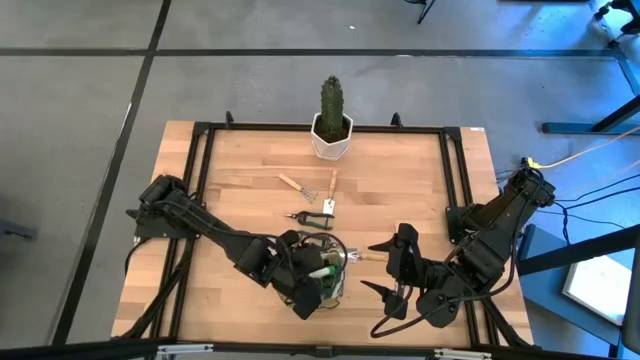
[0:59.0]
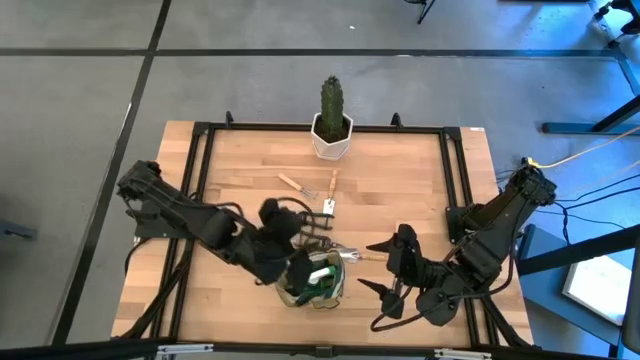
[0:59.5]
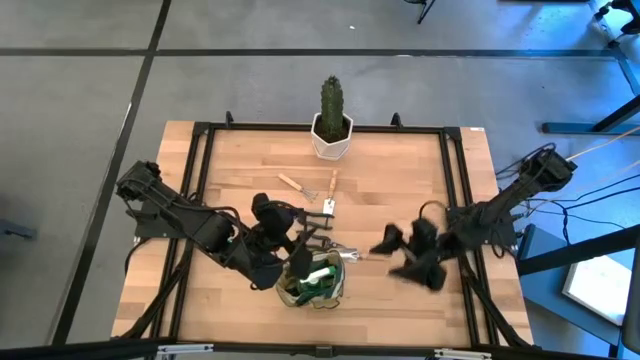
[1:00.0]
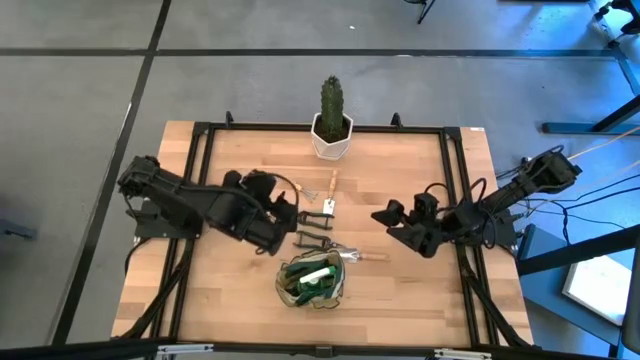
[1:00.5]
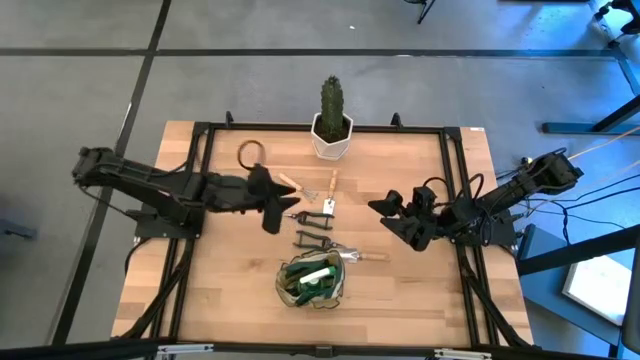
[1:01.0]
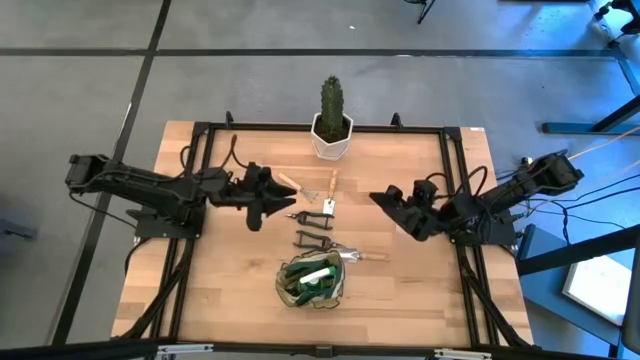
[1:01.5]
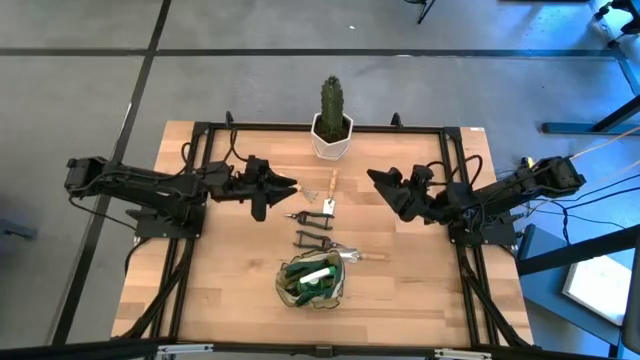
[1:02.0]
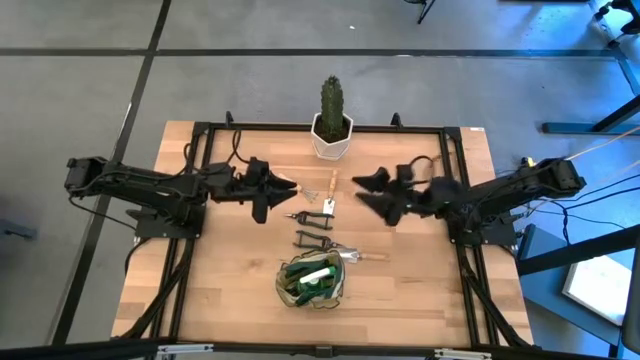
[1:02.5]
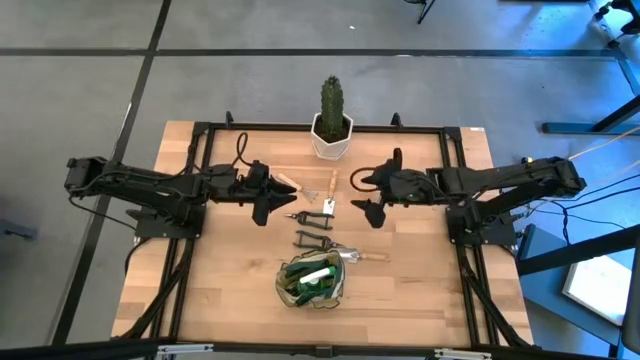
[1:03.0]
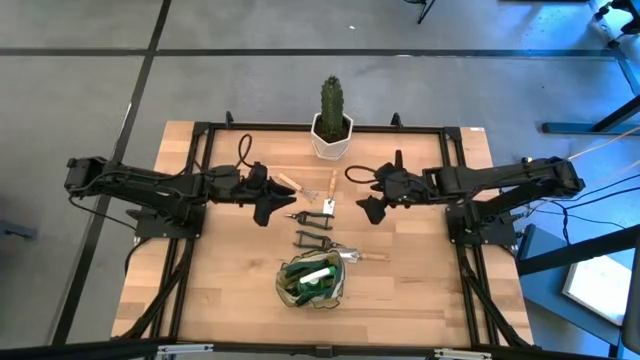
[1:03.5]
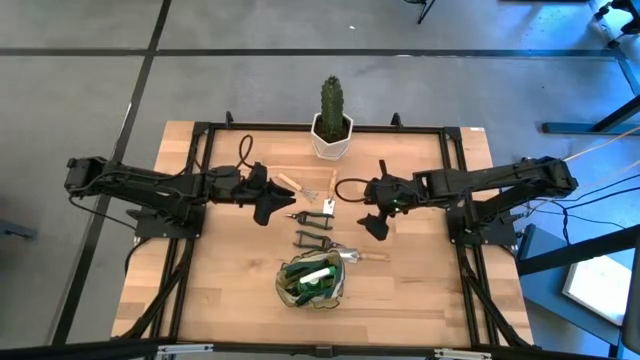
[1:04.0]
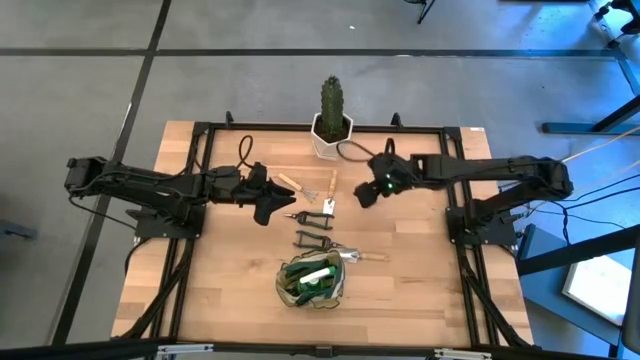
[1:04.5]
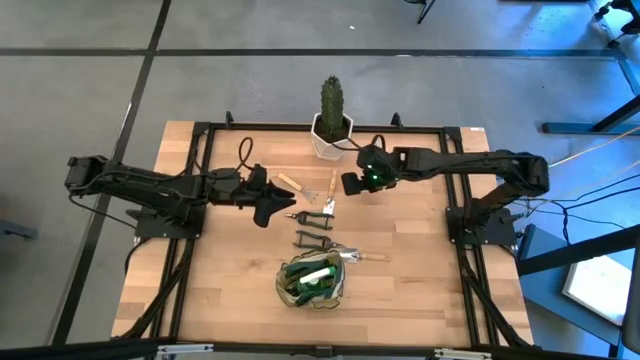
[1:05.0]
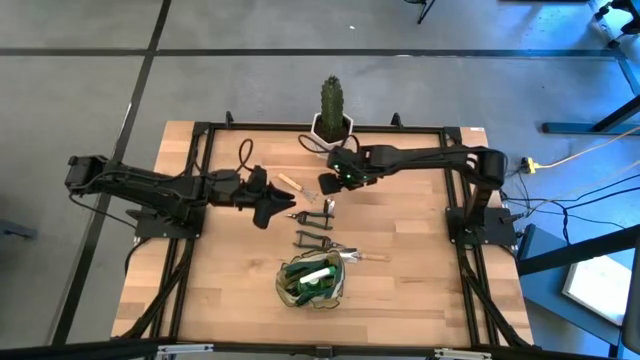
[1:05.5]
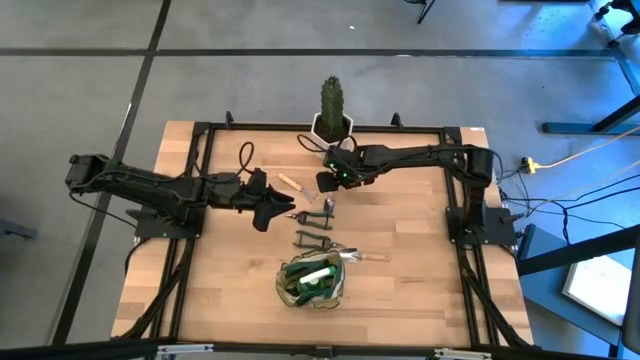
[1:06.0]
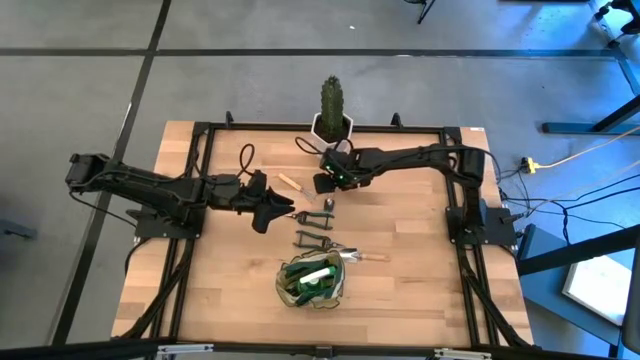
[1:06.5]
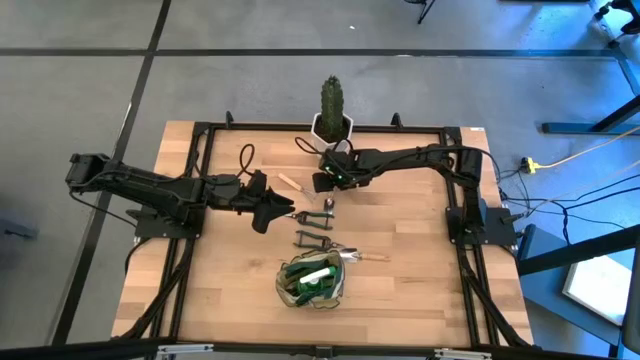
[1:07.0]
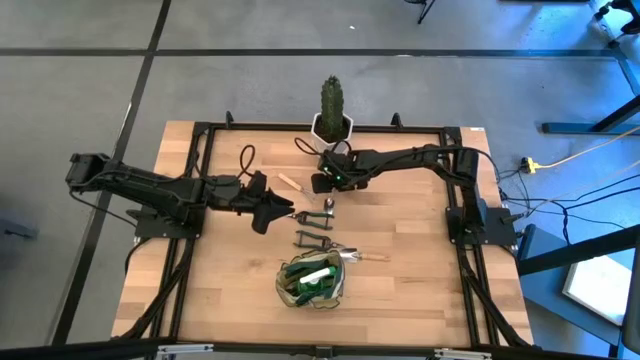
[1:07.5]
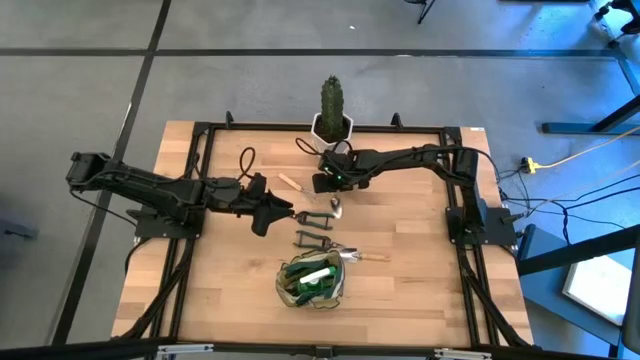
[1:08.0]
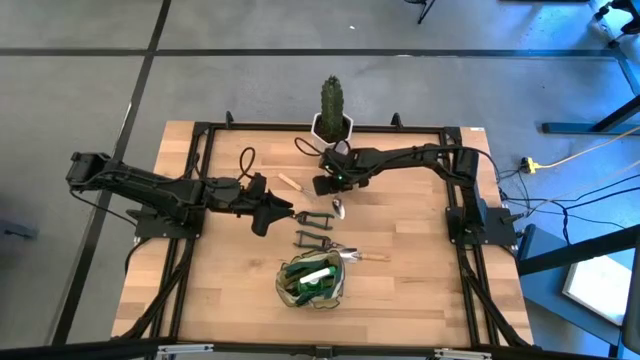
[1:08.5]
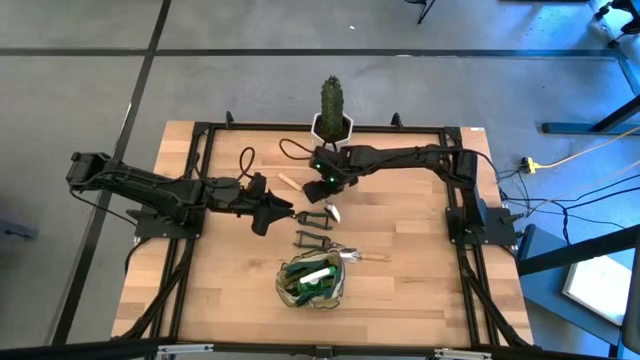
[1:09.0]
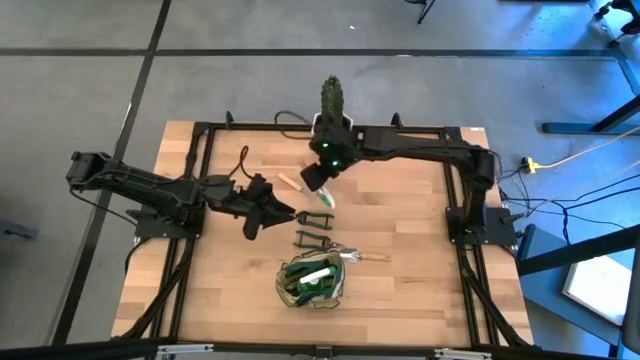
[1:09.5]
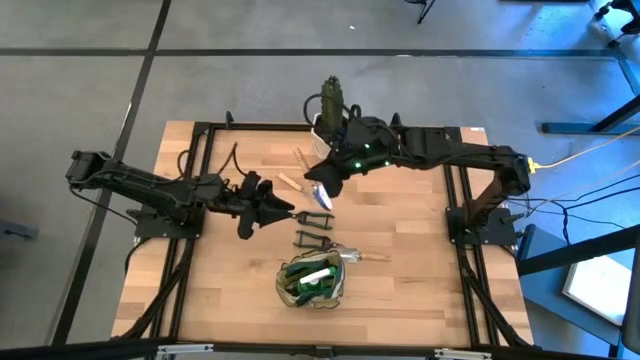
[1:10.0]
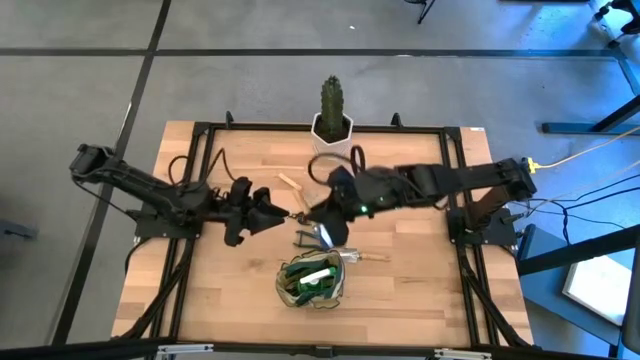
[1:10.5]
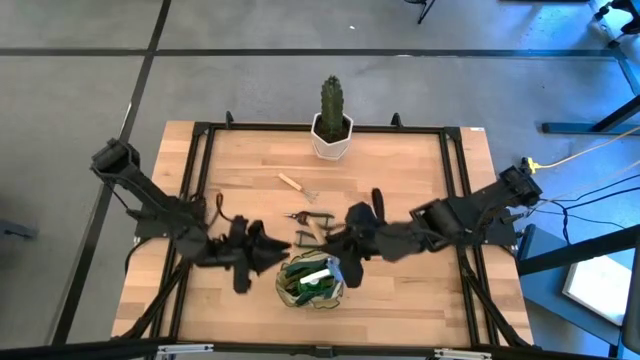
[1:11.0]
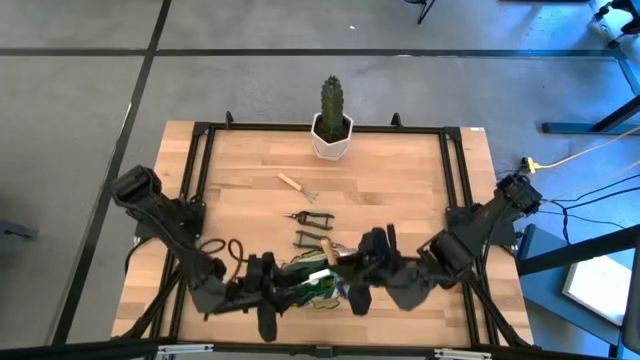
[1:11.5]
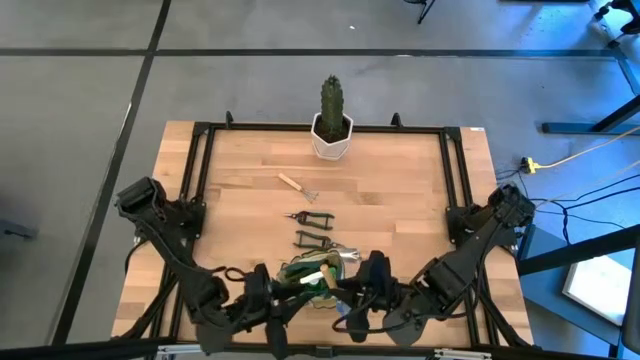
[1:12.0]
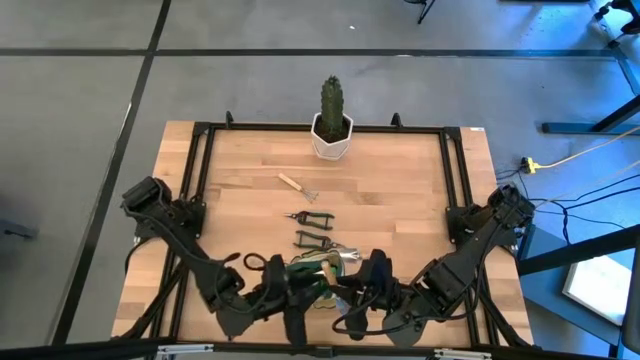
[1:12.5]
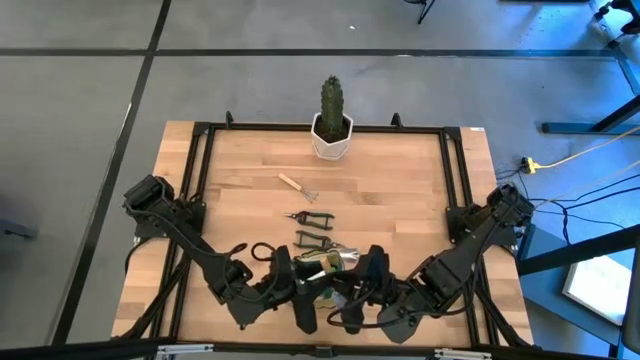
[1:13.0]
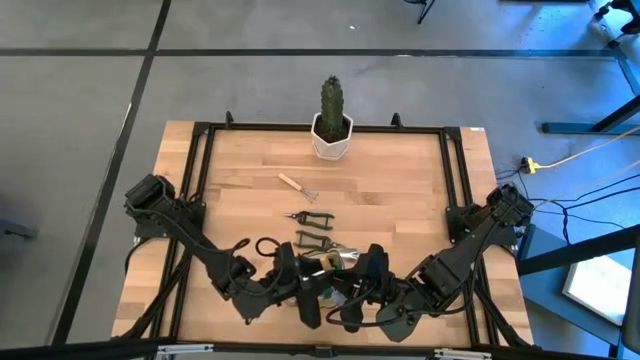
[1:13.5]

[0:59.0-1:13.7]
Task: Pick & Place Garden tools in Gardening bag
Put the trowel into the gardening bag

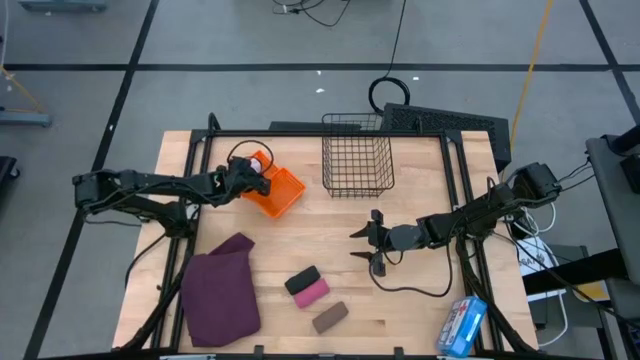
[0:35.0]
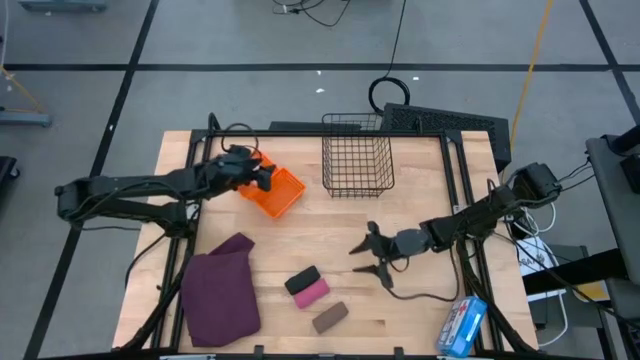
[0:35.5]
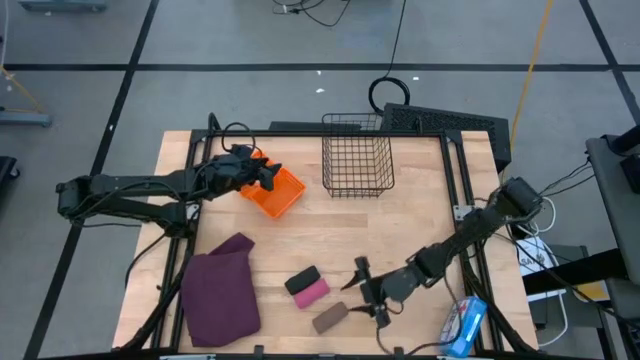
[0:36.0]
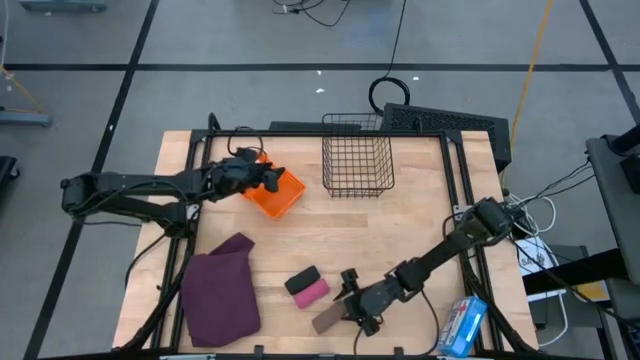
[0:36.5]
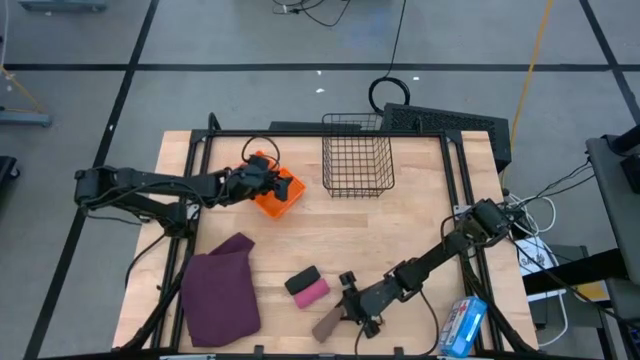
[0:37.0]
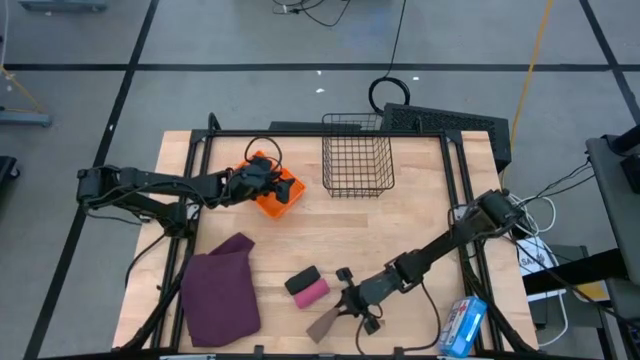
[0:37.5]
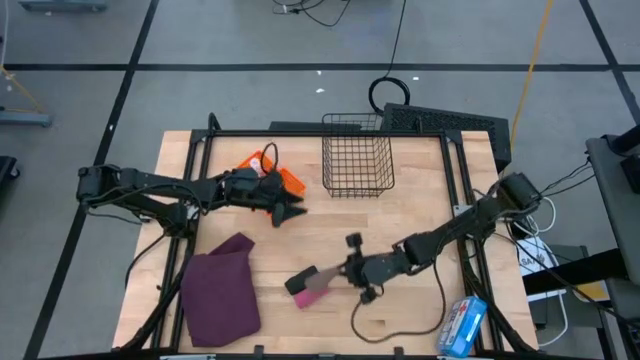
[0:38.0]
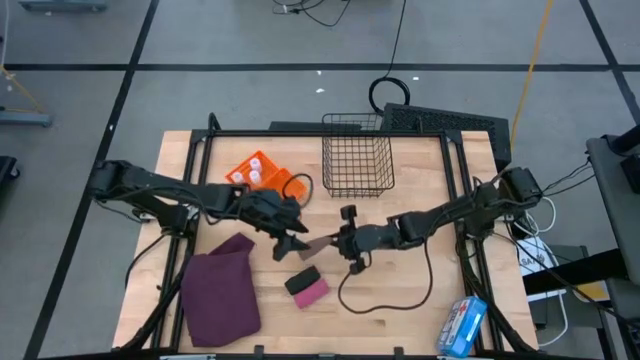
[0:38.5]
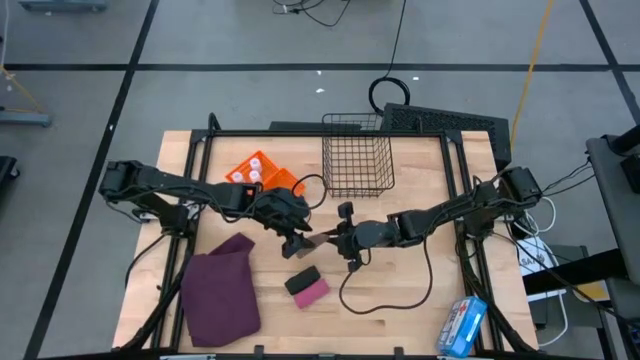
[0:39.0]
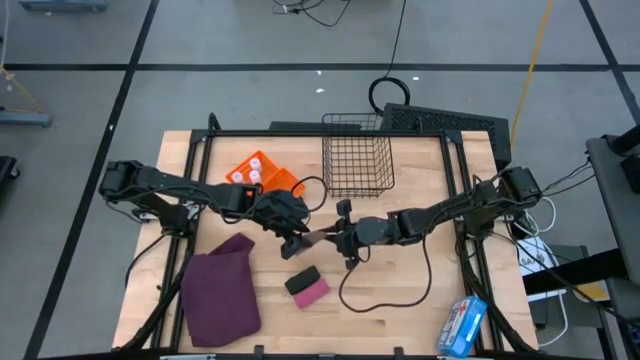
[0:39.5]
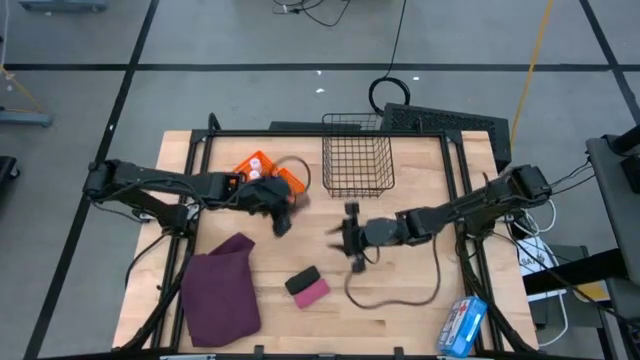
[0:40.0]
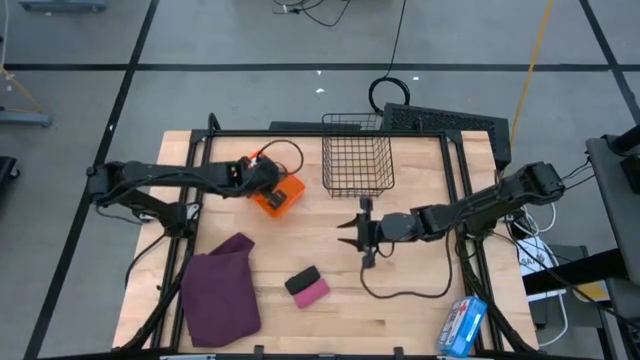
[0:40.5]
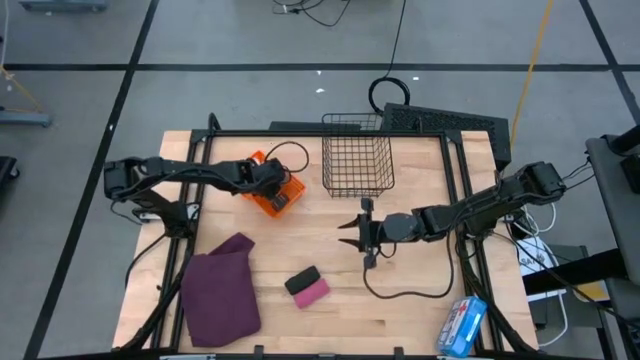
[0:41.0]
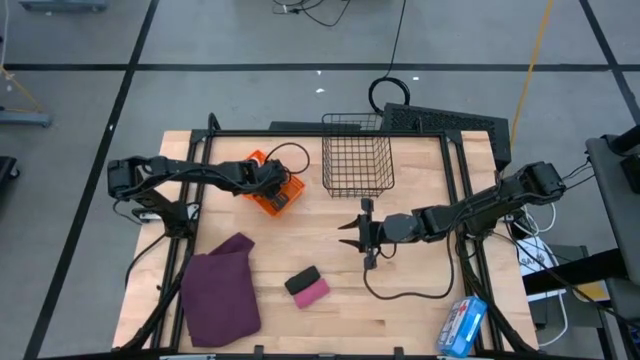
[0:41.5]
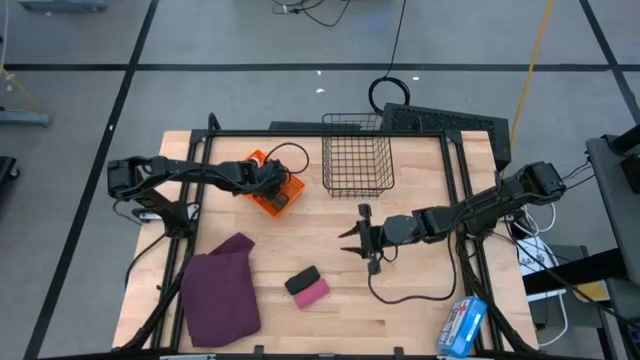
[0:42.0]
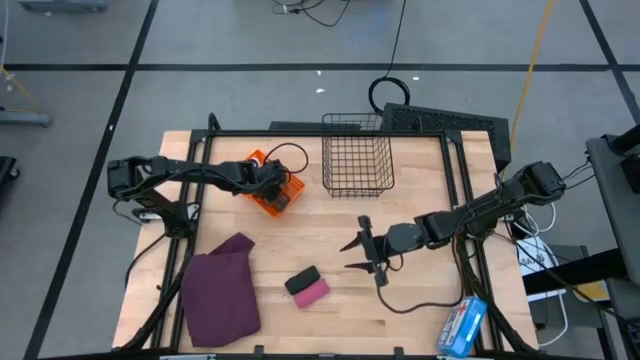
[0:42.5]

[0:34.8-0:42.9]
Task: Pick & Place Medicine items
Put the brown bandage into the bottom orange basket
